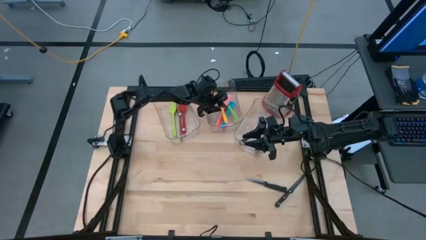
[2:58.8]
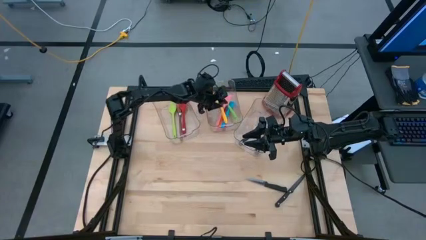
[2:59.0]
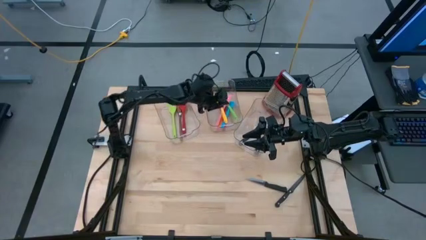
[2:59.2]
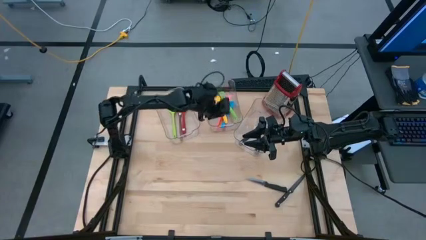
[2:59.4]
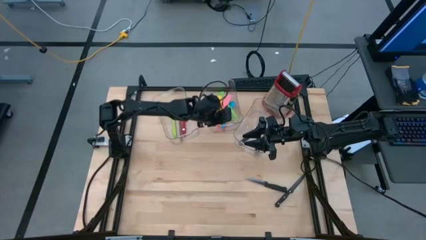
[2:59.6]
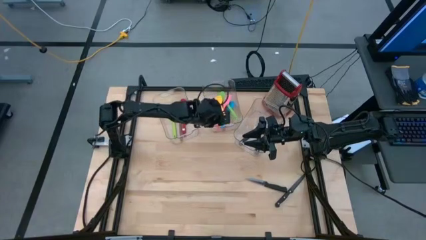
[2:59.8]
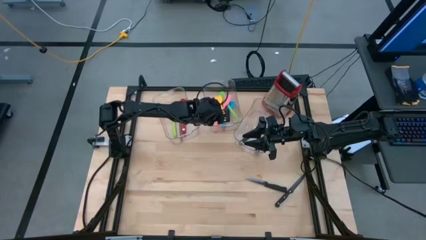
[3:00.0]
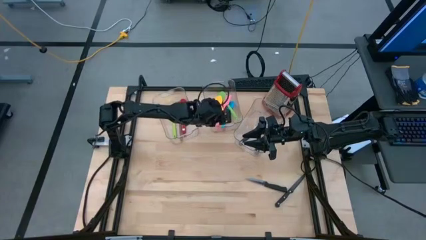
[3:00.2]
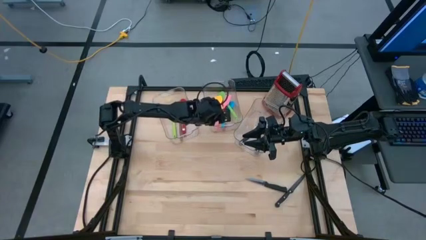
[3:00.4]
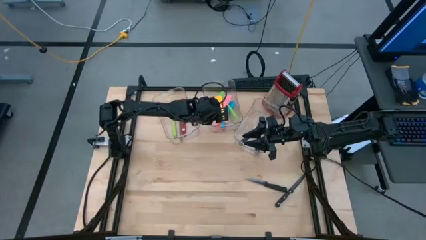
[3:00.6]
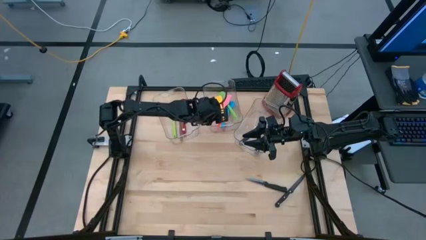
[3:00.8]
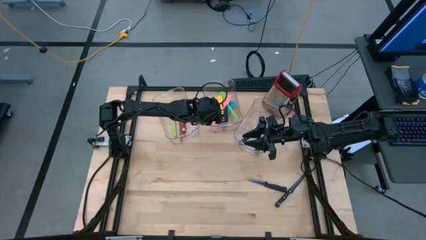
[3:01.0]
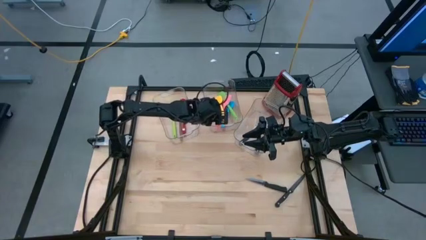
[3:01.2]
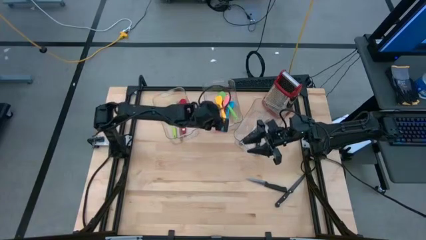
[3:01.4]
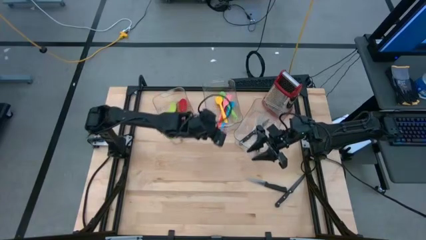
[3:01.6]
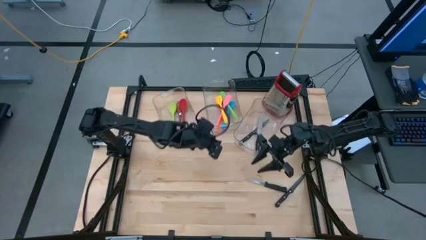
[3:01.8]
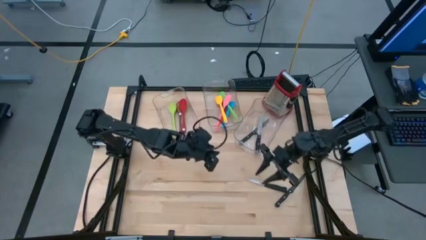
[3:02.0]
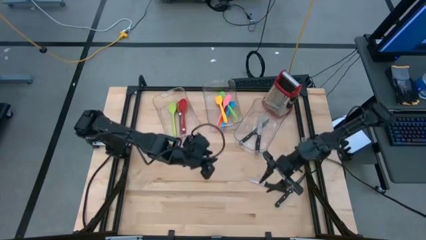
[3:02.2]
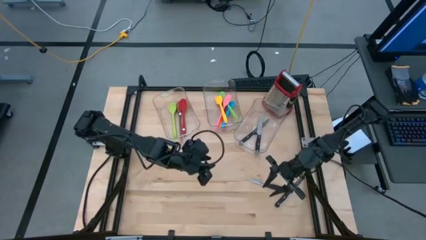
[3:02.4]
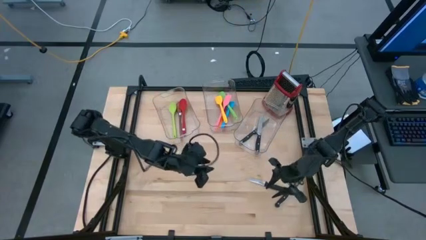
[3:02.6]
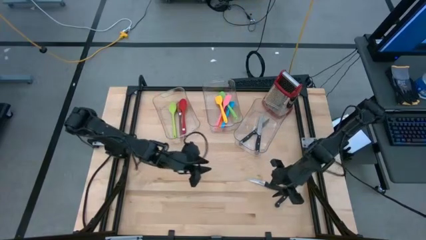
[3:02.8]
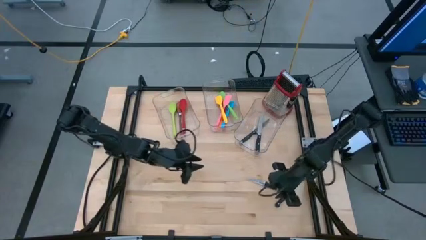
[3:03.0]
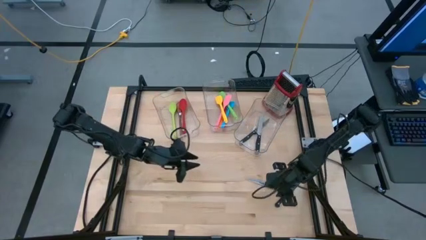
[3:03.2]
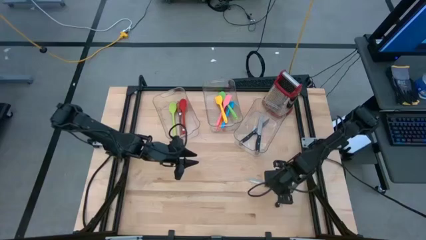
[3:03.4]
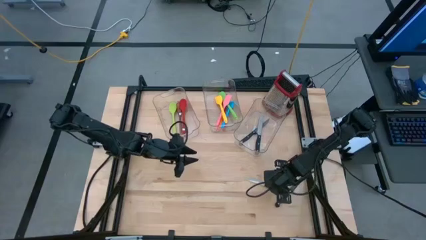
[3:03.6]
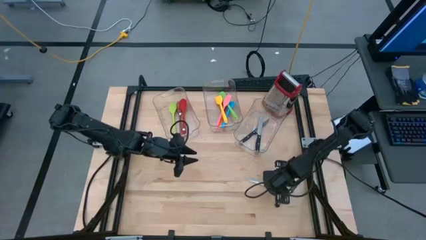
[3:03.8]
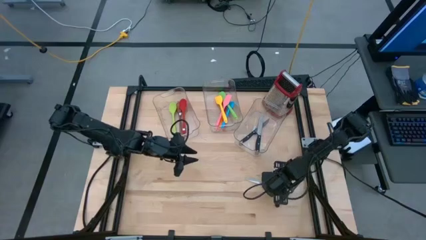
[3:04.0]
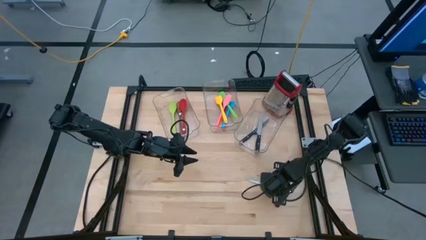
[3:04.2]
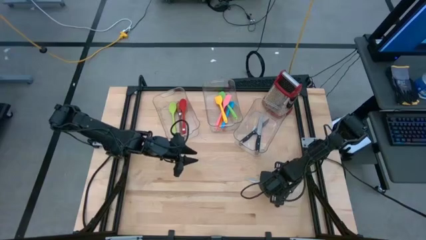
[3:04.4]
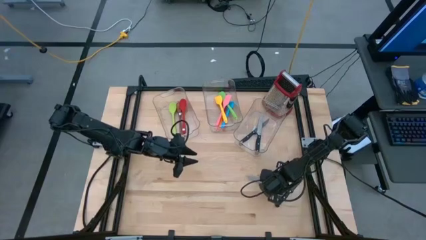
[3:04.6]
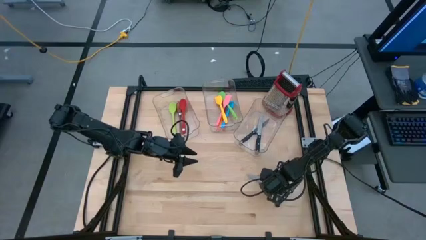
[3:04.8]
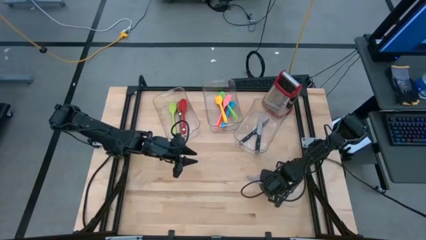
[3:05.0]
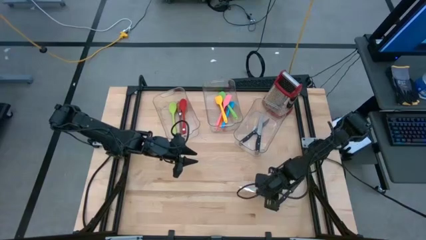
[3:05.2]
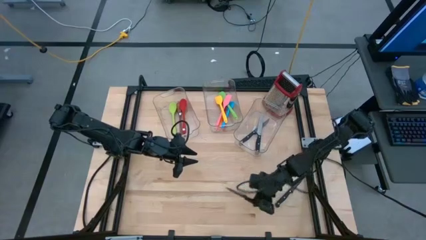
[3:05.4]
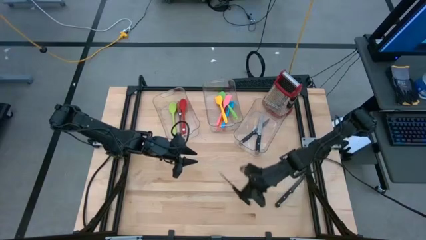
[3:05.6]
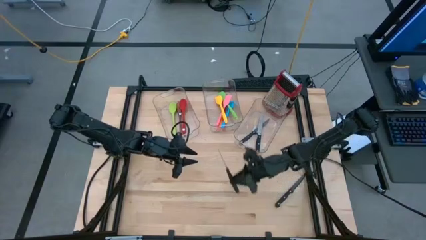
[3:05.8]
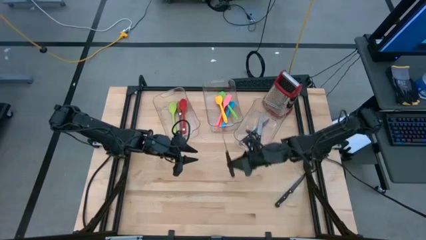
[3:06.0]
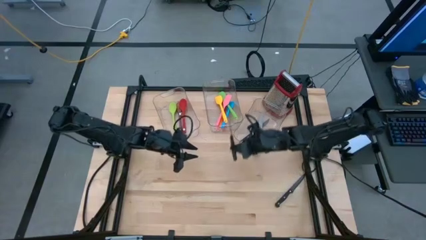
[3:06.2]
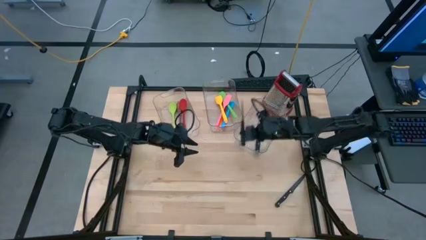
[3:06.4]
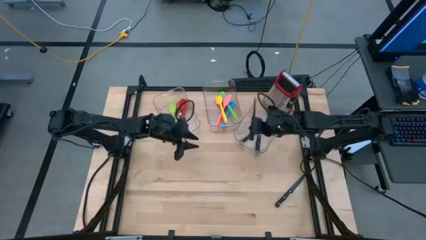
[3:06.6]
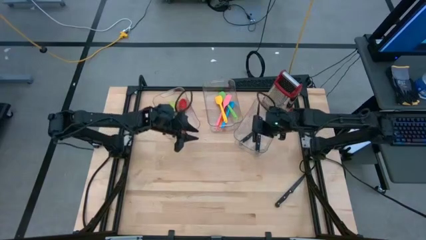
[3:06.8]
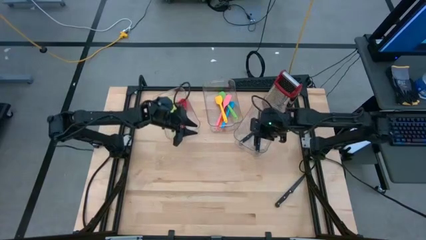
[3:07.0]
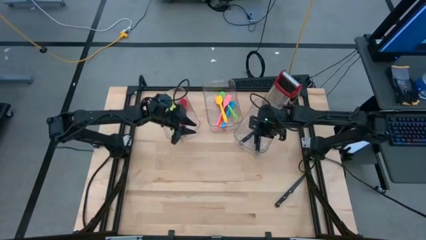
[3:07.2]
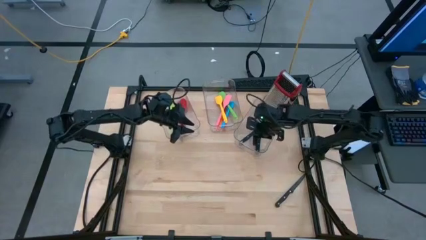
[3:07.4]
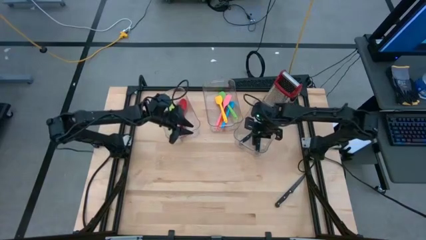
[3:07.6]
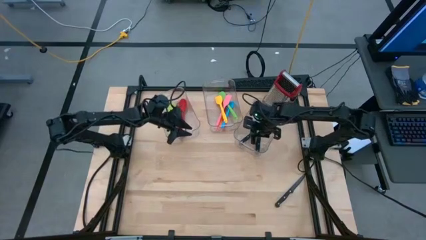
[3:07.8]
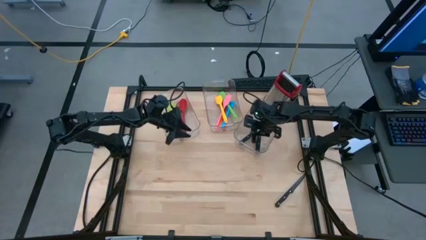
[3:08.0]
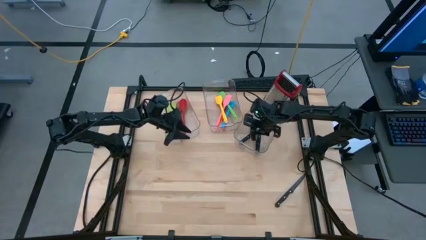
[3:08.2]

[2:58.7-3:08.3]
Task: Pick & Place Kitchen Items
Put the silver kitchen knife in the right bin

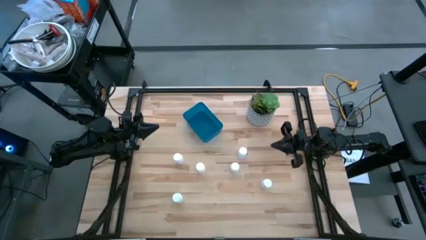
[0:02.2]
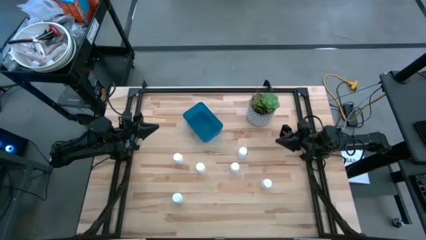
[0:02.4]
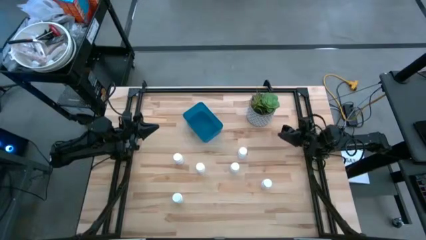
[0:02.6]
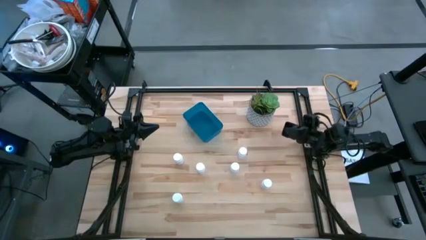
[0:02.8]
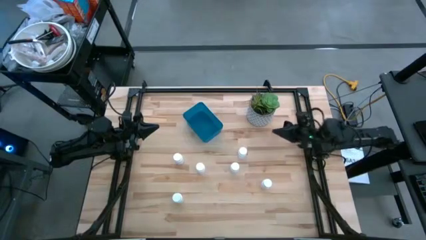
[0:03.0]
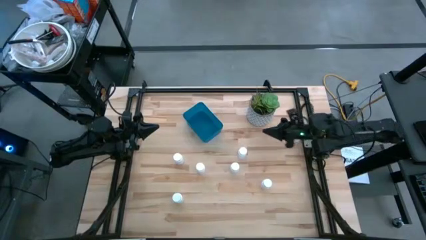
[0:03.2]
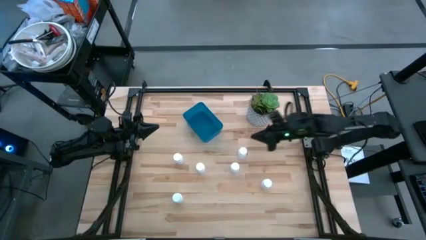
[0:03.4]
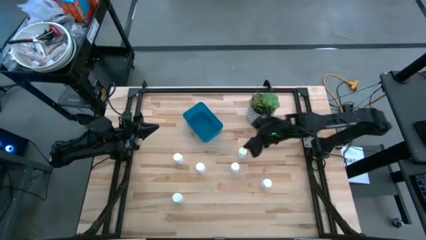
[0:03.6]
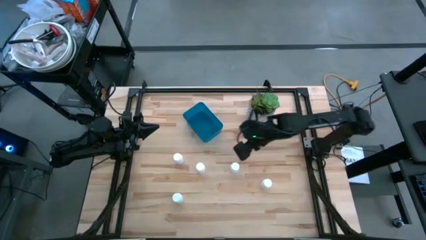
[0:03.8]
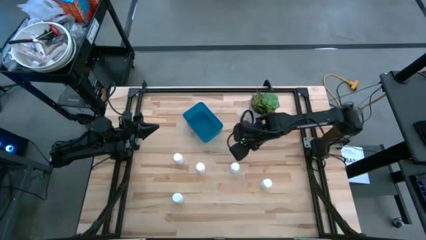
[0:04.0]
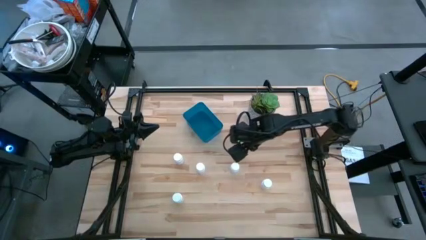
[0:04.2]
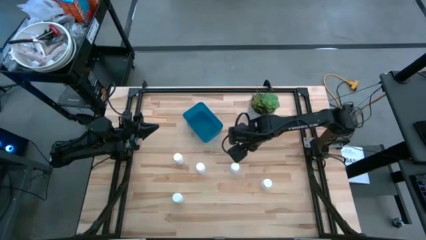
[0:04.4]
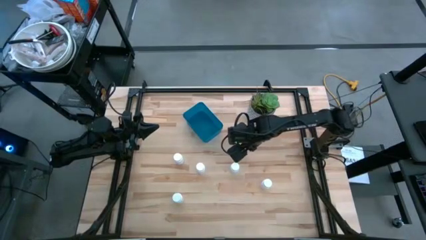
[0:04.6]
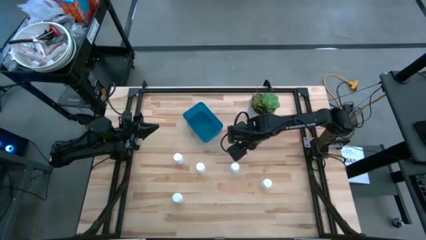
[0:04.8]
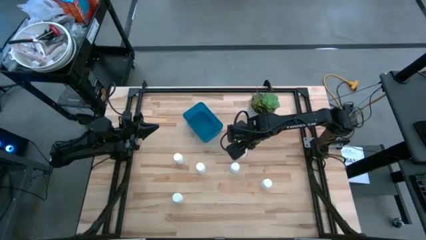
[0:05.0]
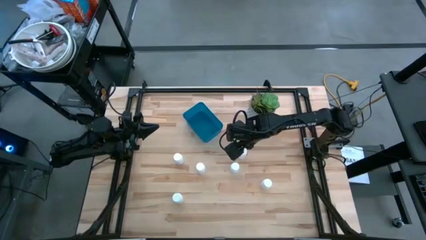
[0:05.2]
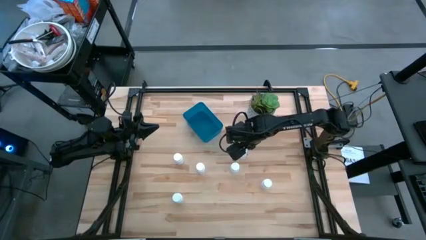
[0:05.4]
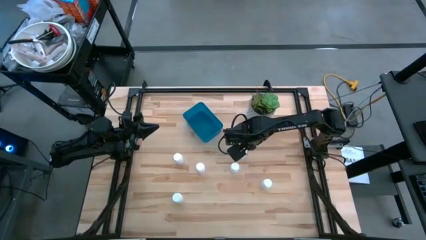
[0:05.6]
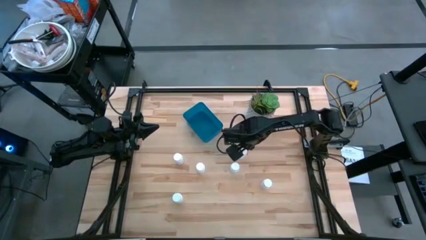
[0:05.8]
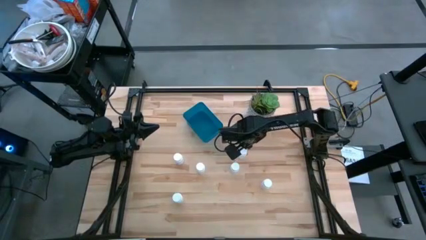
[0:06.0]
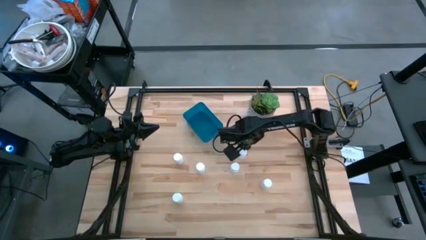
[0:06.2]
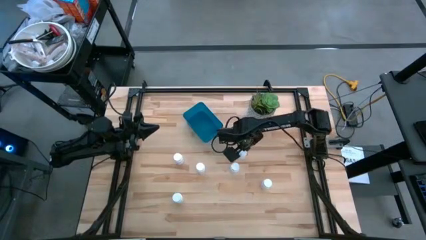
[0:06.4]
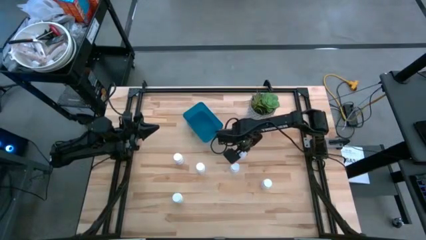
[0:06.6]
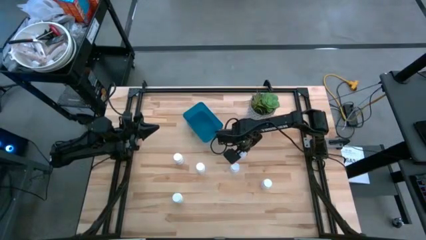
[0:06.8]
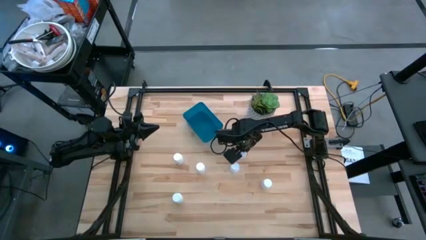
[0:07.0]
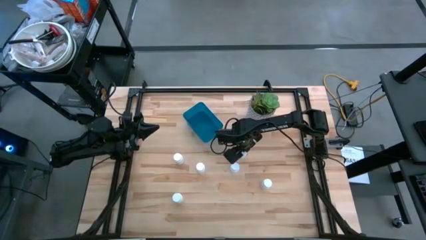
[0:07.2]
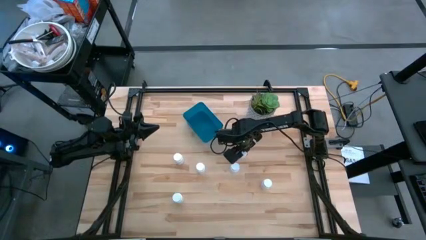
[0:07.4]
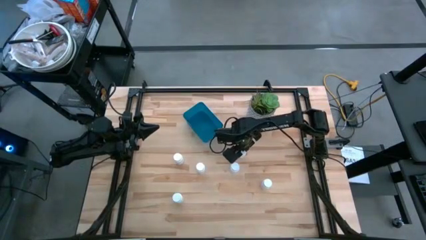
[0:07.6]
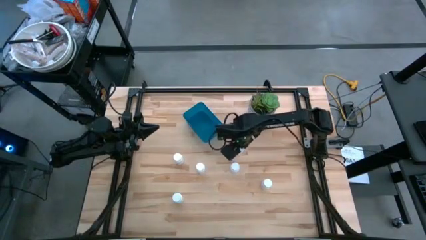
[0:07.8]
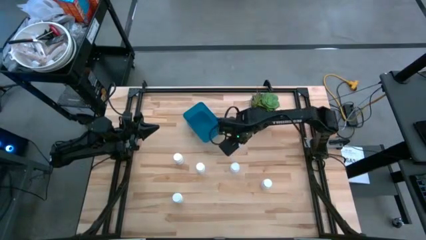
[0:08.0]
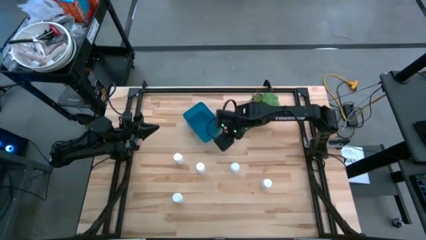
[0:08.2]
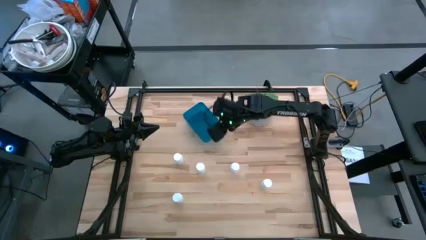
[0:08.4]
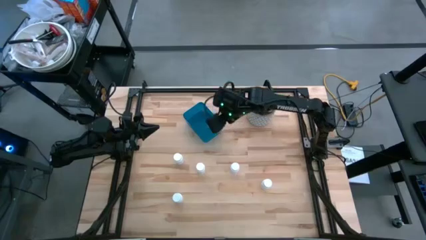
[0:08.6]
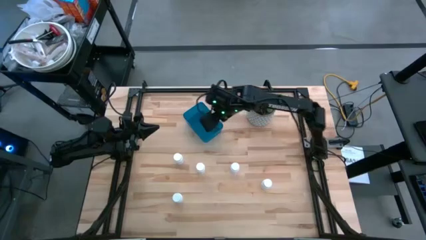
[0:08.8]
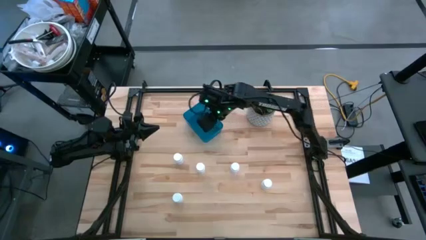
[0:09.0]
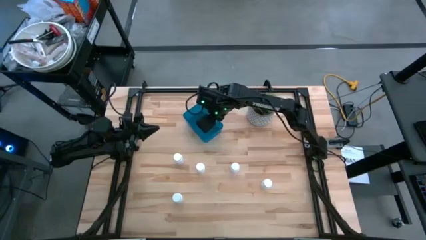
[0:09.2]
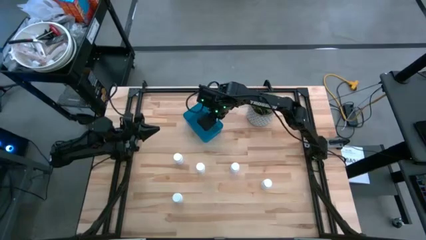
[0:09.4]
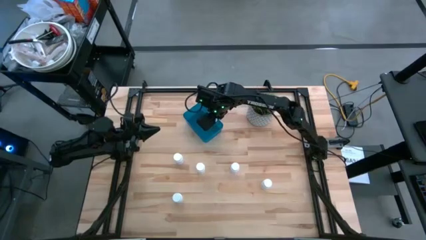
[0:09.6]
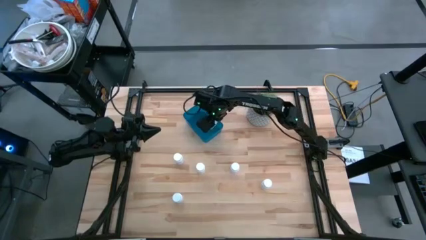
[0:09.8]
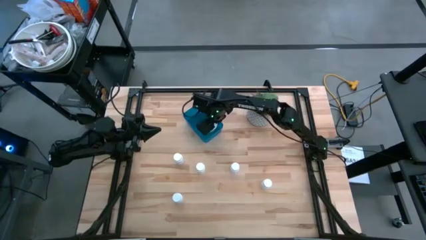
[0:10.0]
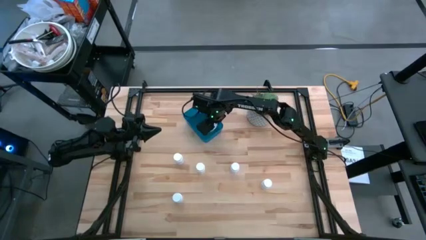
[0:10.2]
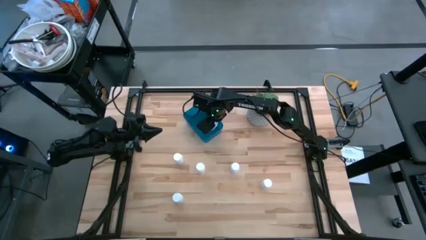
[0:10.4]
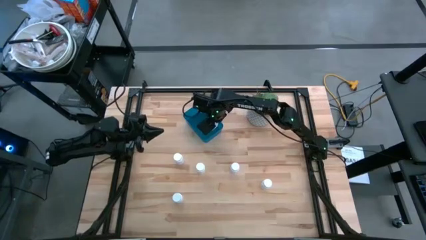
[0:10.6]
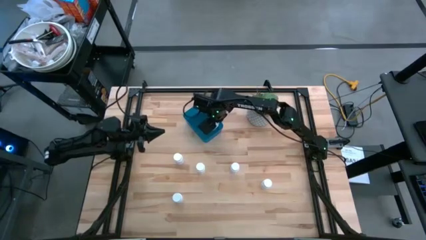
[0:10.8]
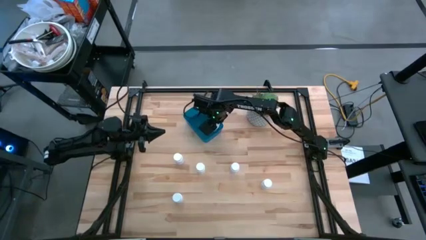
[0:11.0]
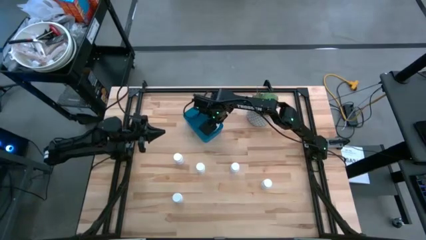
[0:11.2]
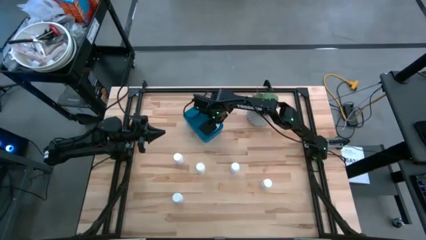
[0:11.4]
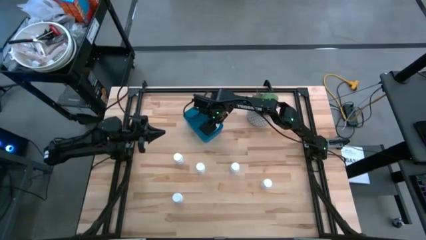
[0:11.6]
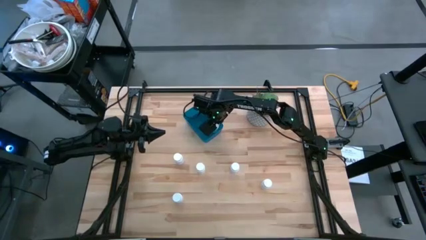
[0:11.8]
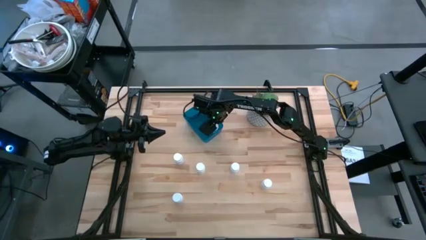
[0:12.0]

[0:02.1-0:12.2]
Task: Pick and place pill bottles into a basket
Put white pill bottle into the dark blue bin
